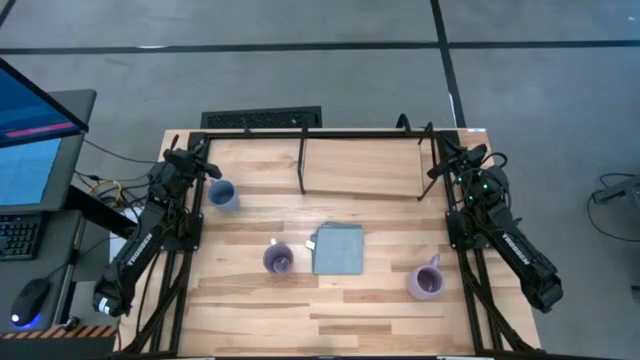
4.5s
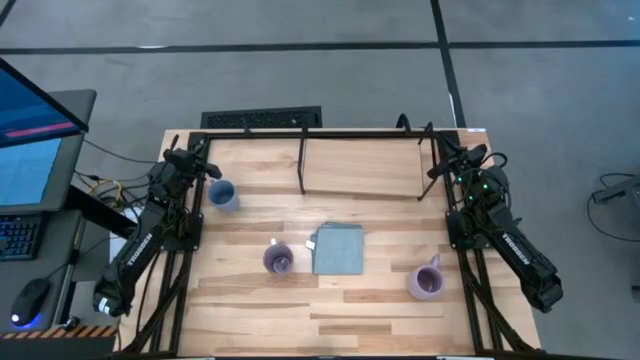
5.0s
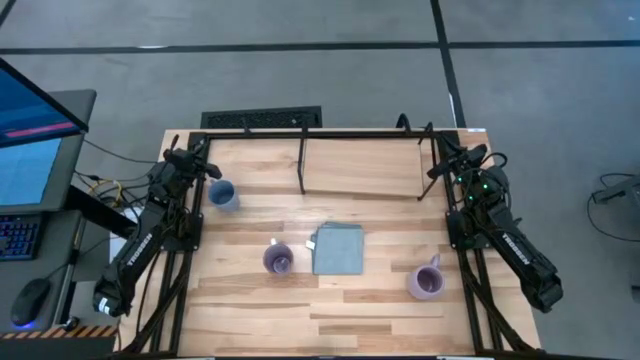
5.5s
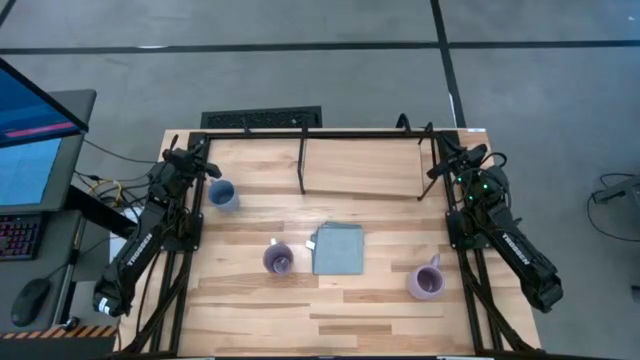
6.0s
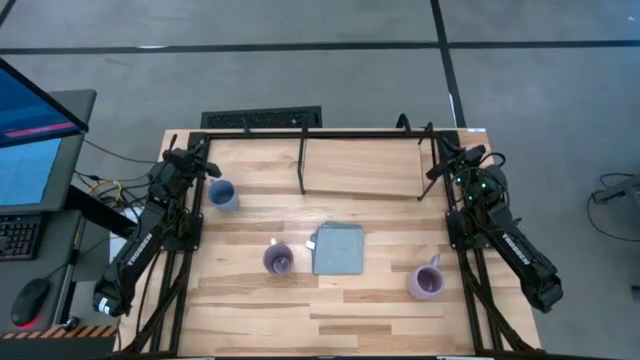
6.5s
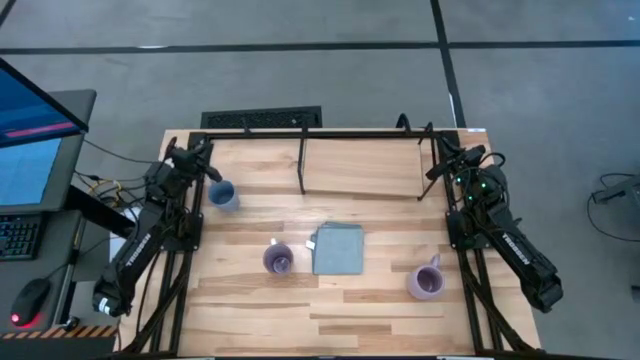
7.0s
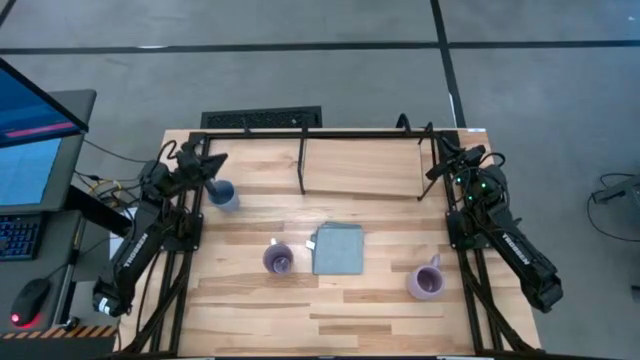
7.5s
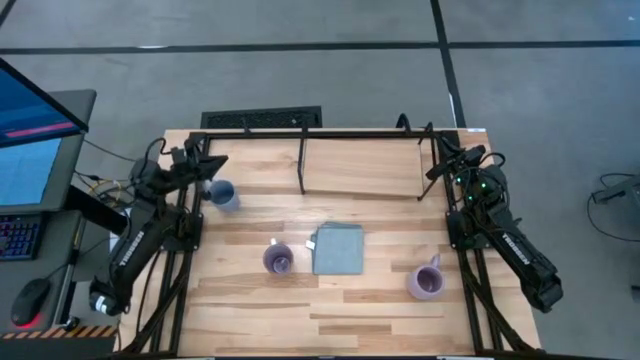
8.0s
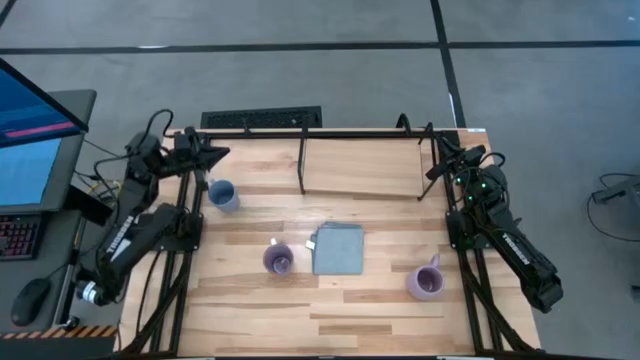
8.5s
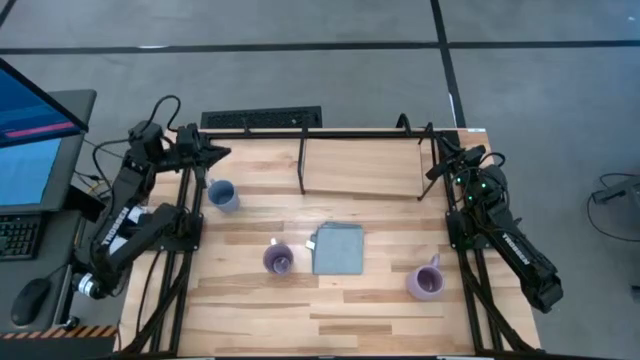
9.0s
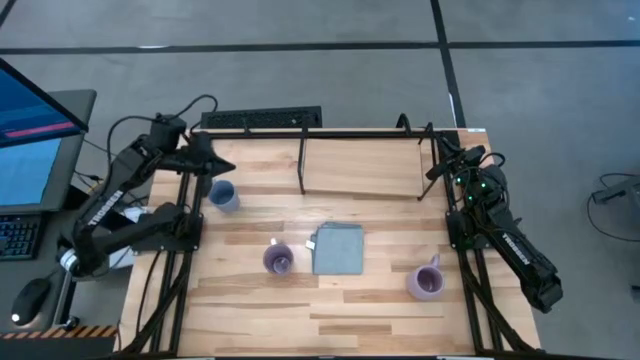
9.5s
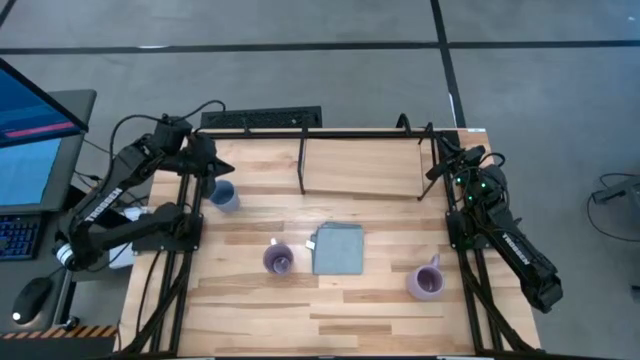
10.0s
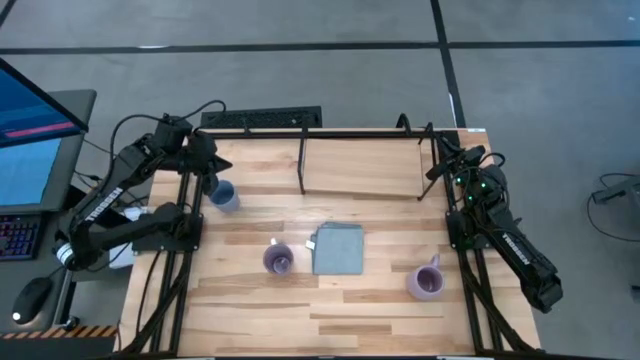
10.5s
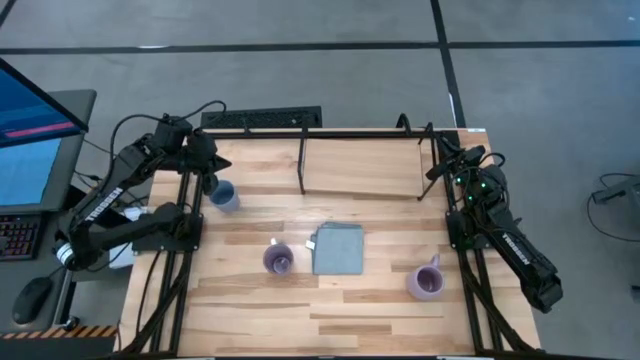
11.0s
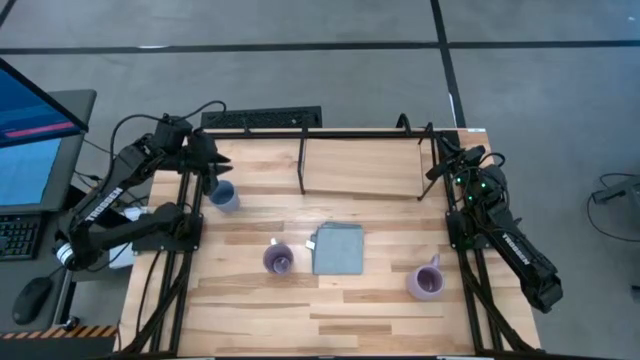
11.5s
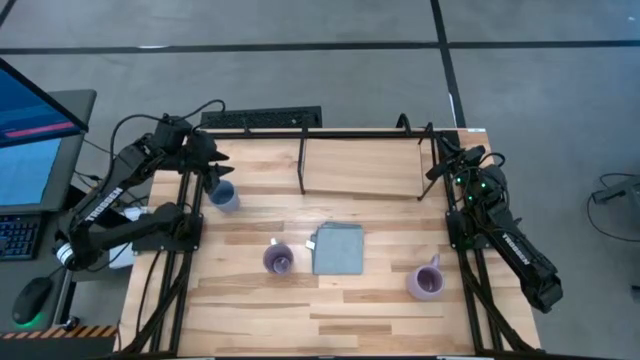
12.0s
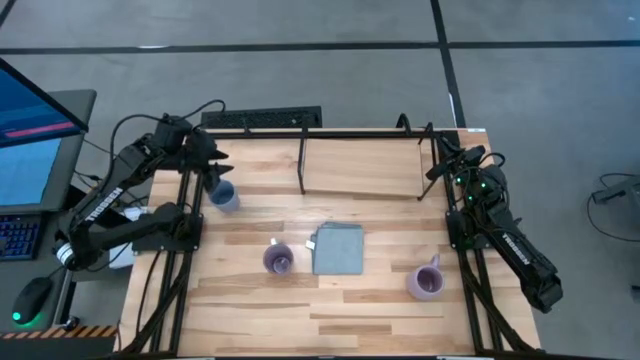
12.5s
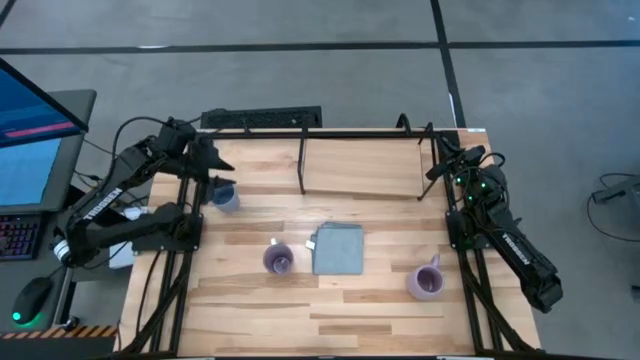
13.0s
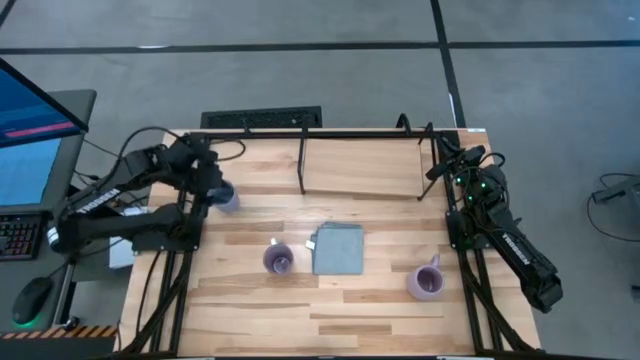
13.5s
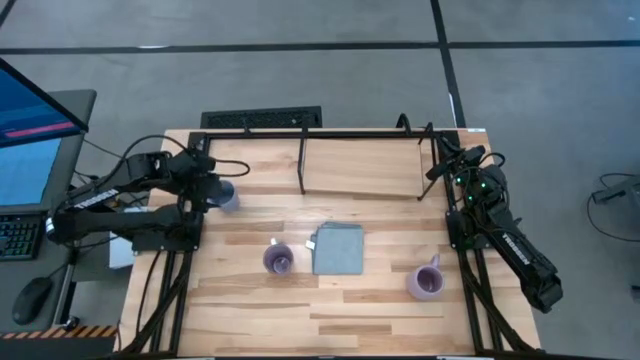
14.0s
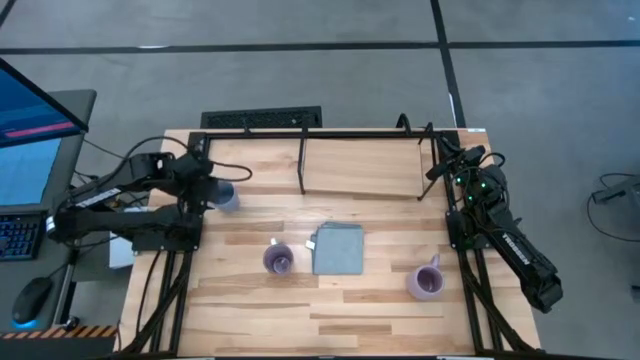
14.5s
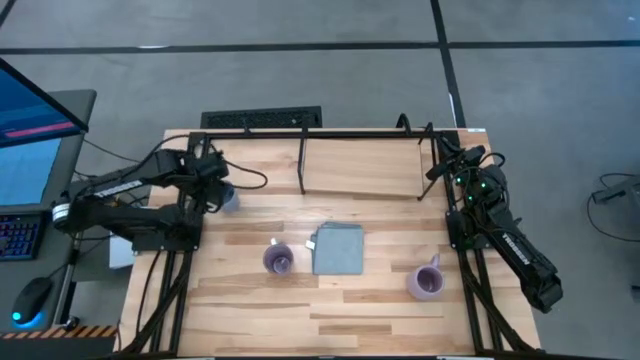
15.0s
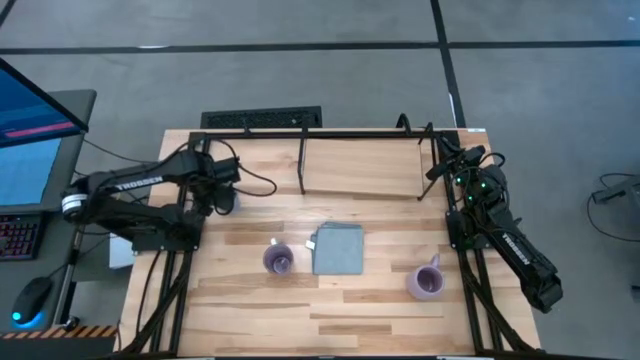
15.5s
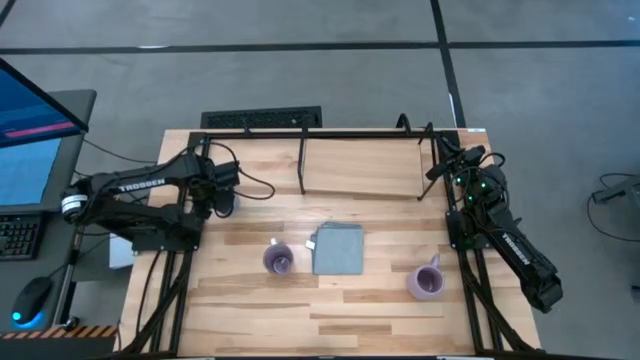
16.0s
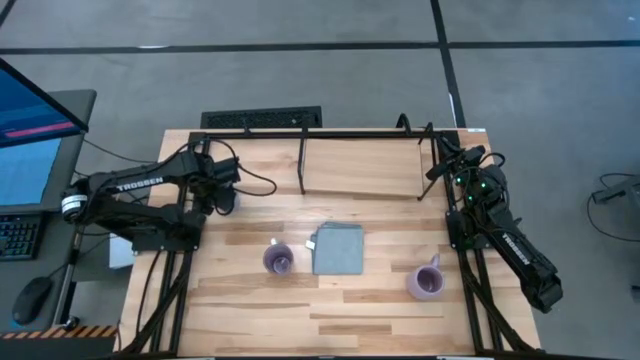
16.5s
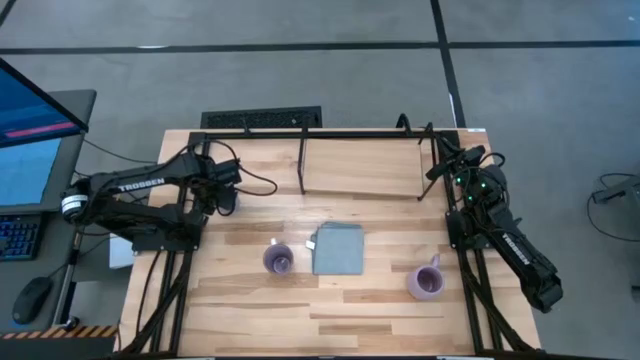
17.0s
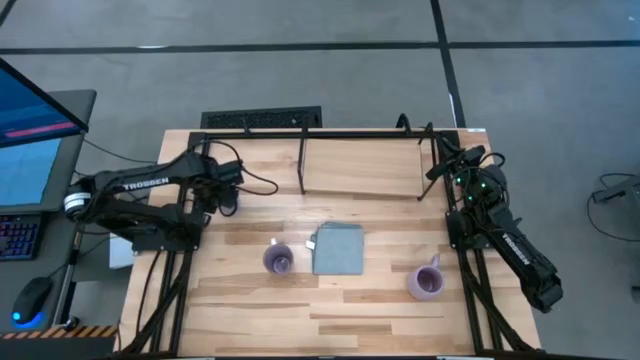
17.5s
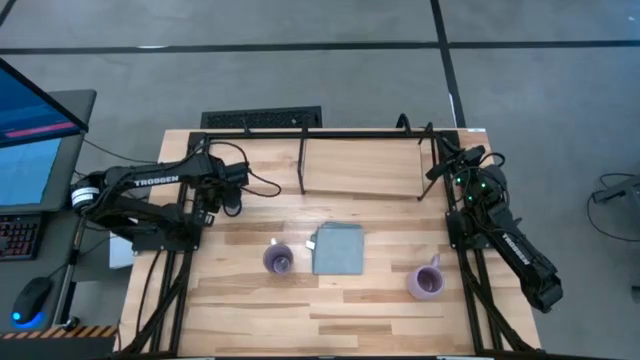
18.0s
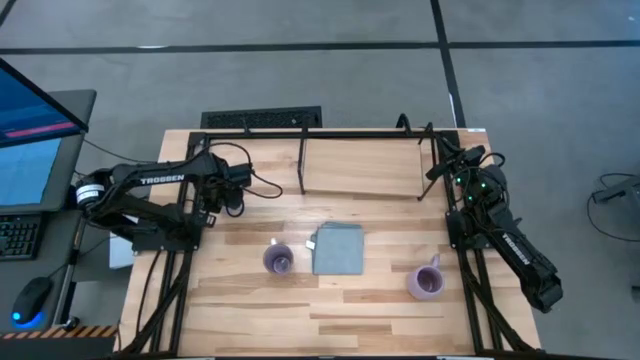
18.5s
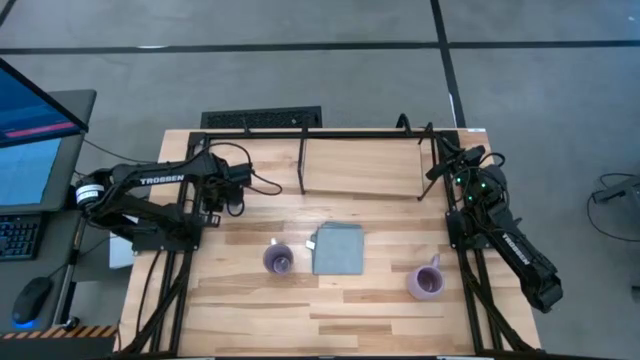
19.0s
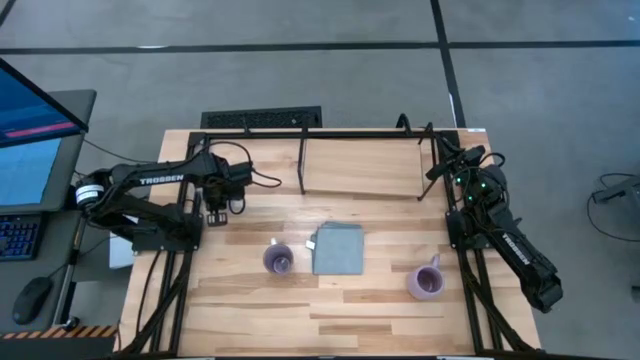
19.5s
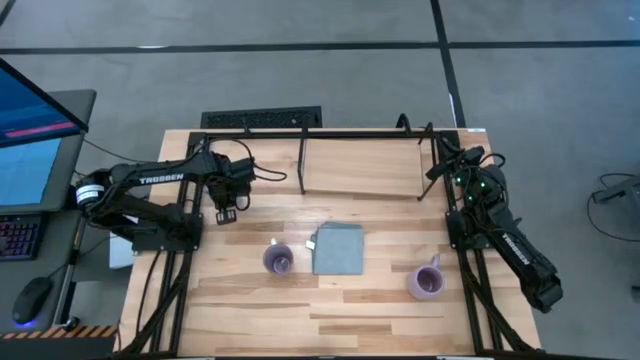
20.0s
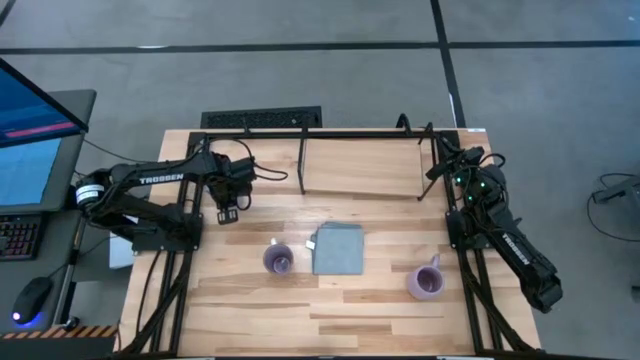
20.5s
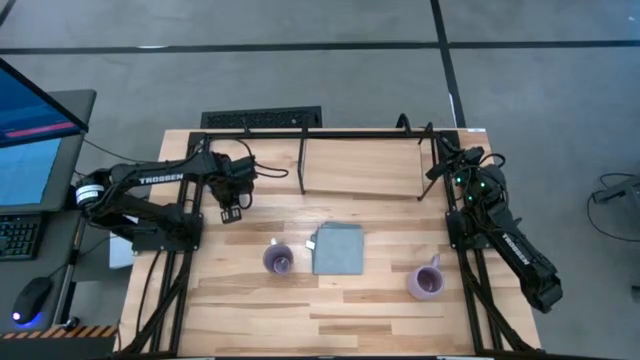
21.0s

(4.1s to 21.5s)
Task: Stack small to large cups/mugs on shelf
Put the light blue cup on the shelf

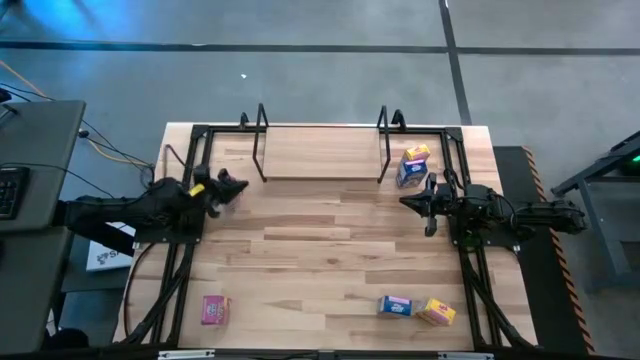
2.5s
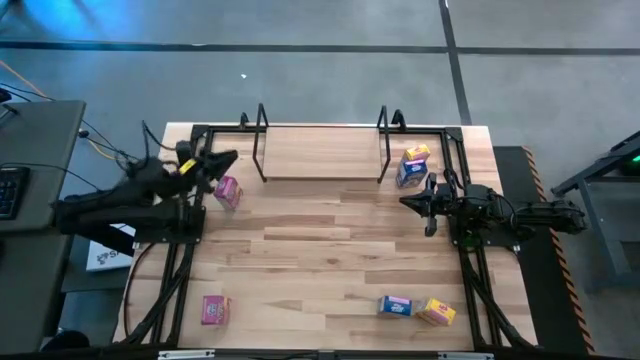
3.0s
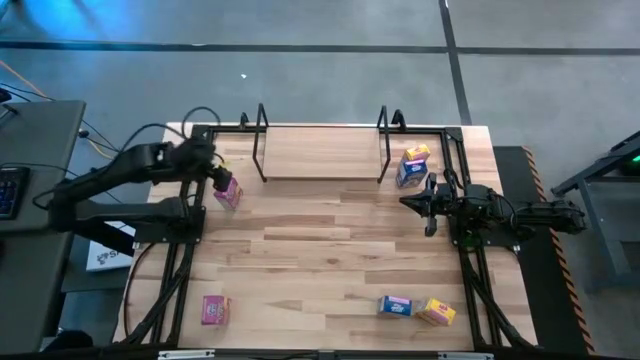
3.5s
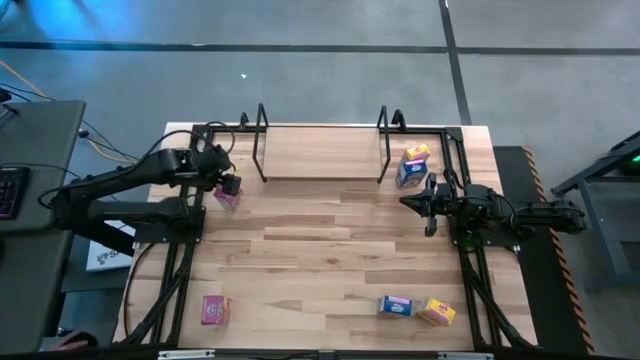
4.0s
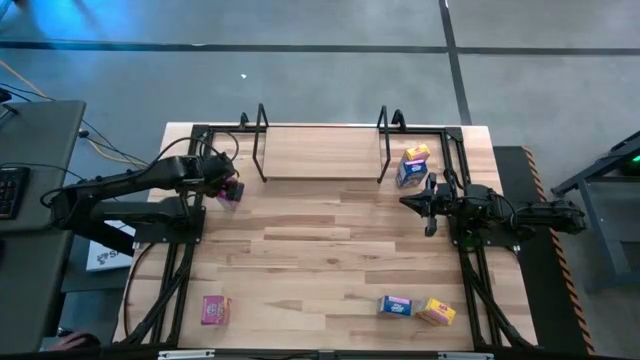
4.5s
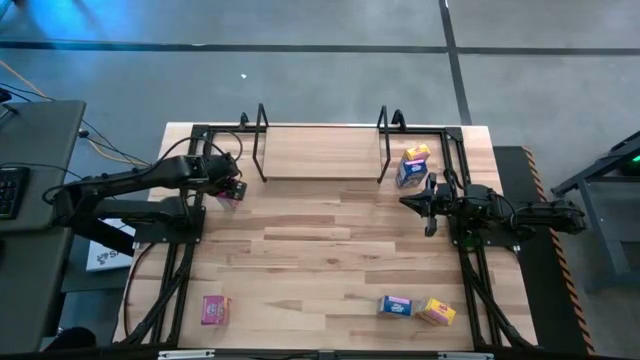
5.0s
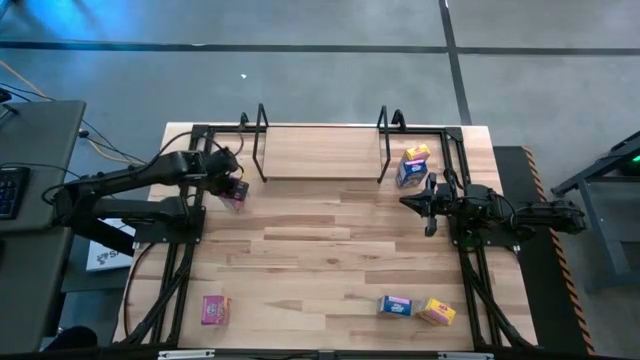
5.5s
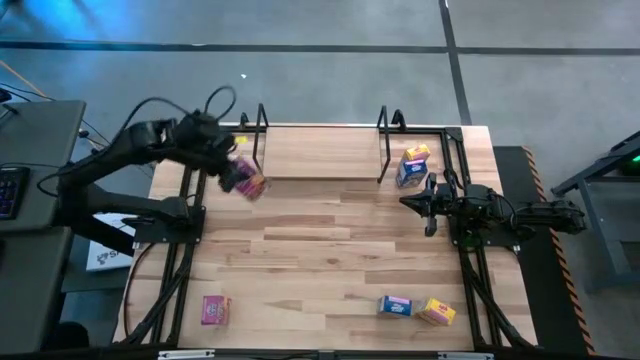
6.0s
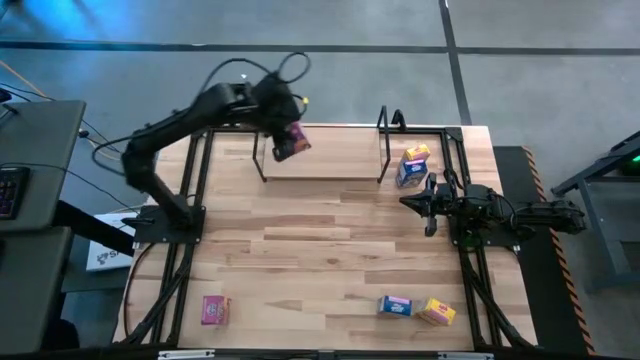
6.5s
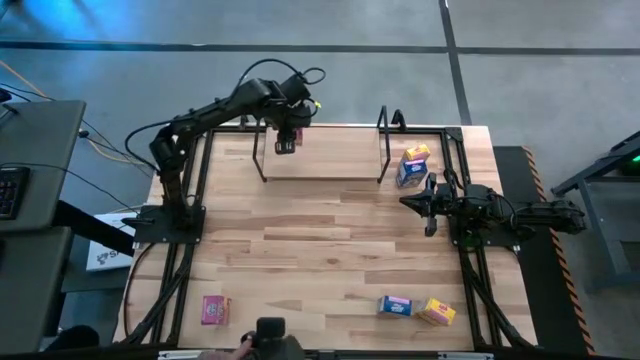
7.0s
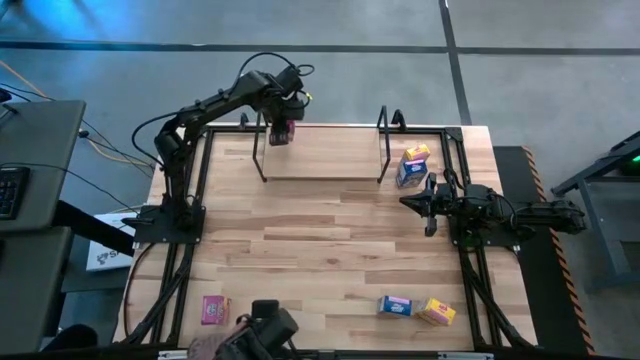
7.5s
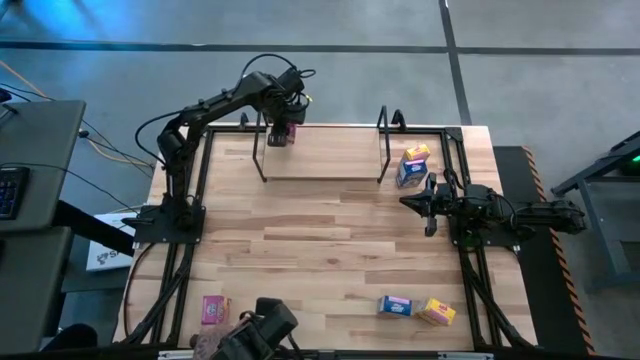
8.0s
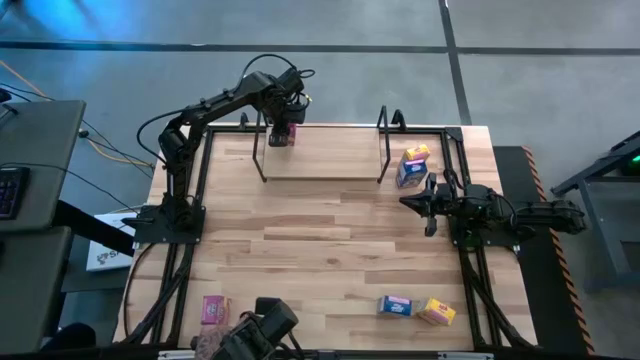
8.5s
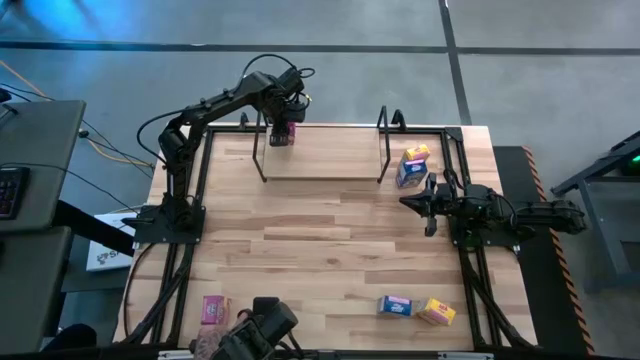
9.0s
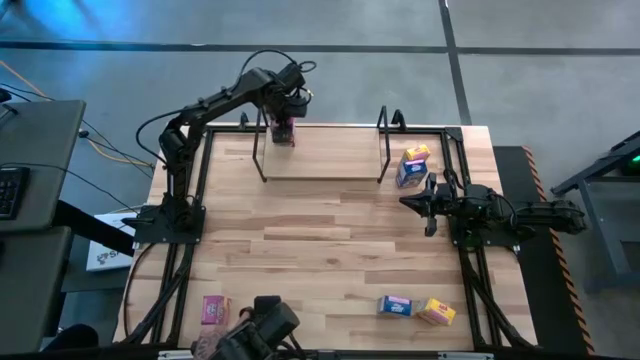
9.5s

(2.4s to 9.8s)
Task: Stack cereal on shelf
Put the top violet cereal box on the shelf
